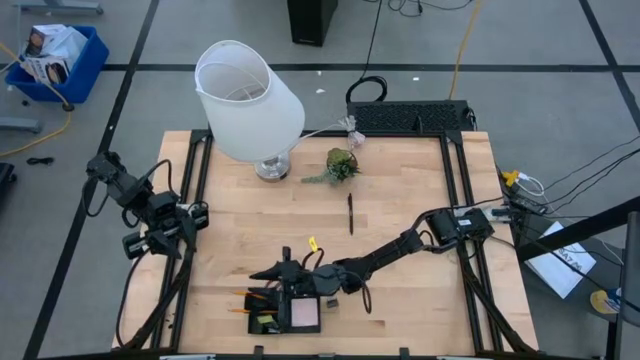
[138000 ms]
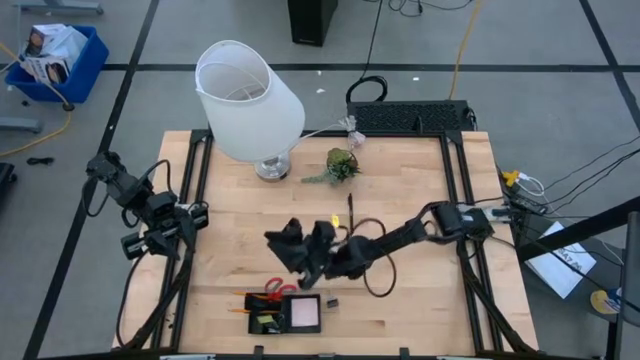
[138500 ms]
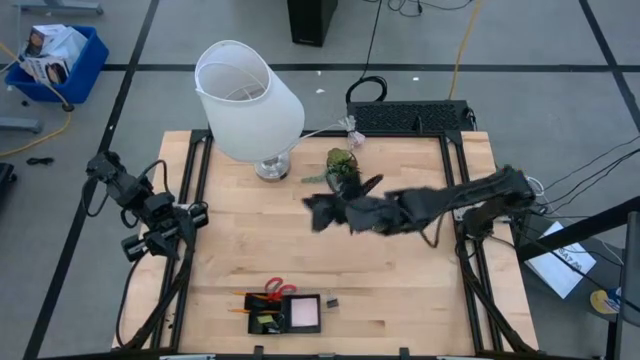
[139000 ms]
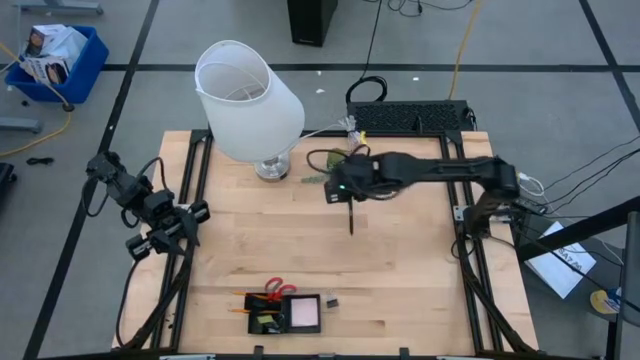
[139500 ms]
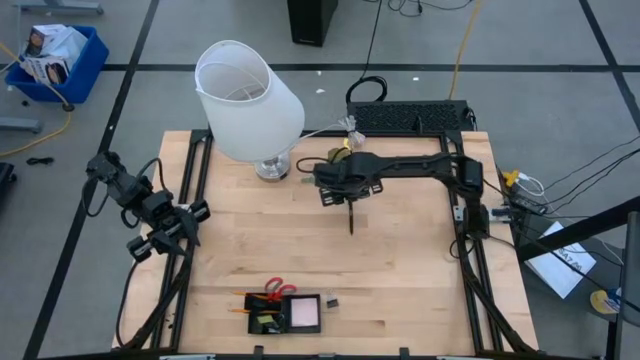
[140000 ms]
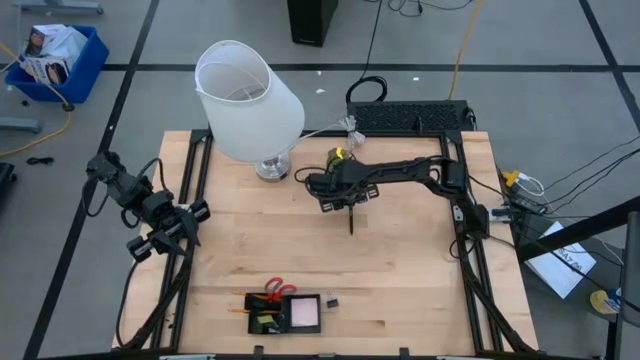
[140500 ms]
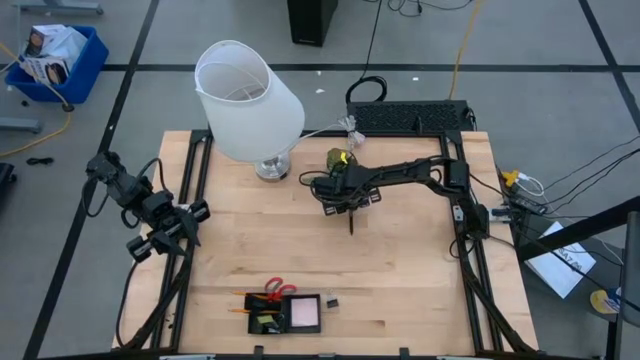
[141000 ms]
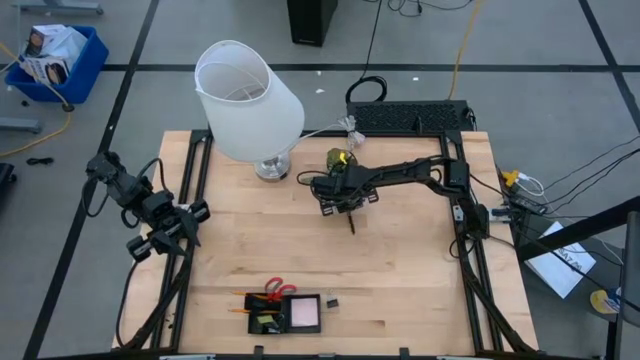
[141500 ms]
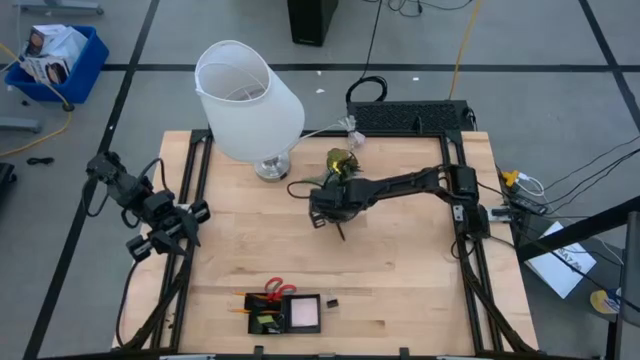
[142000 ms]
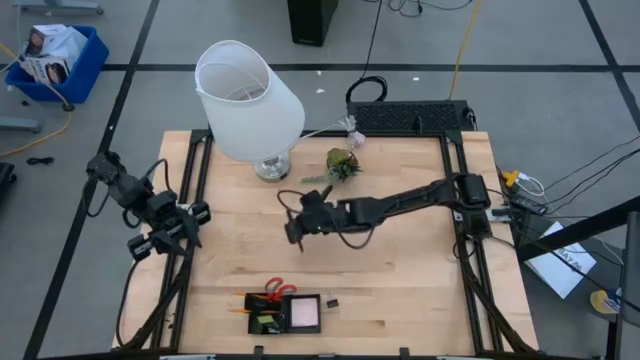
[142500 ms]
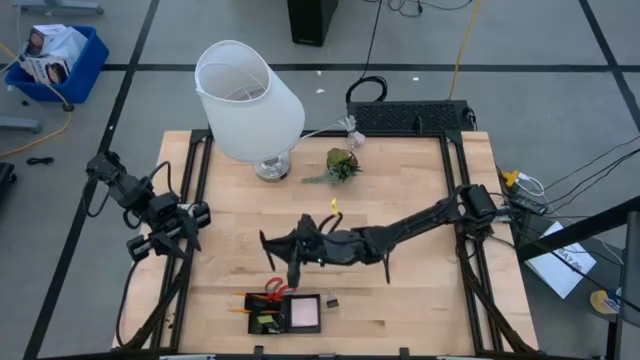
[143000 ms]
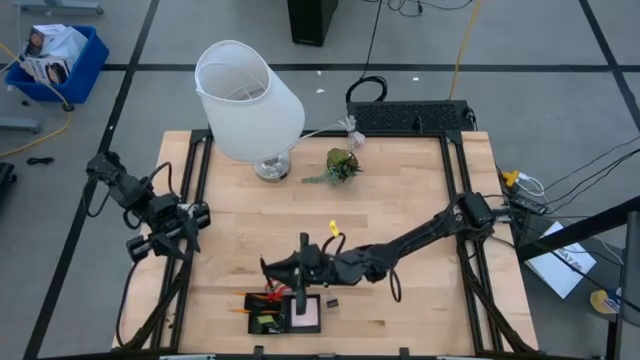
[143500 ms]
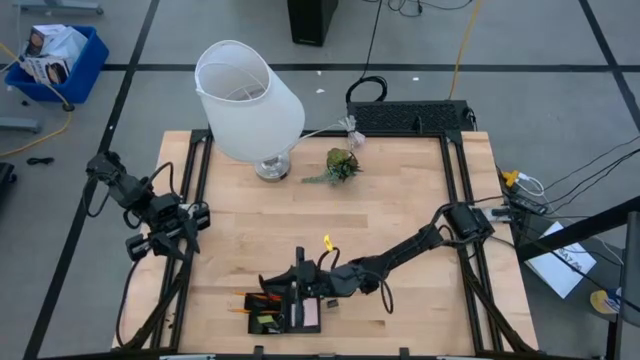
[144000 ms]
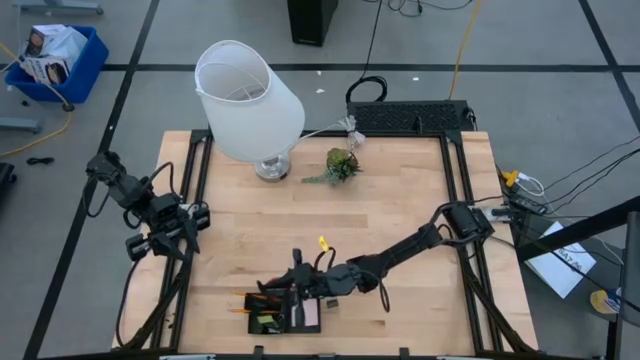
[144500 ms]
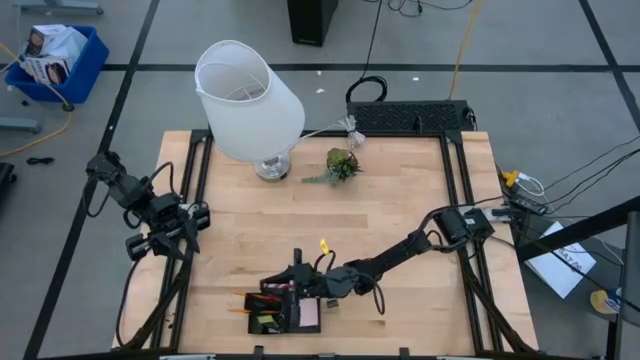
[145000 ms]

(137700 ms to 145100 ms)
Task: Pick and place office supplies into organizer
Put the black pen into the mesh desk organizer

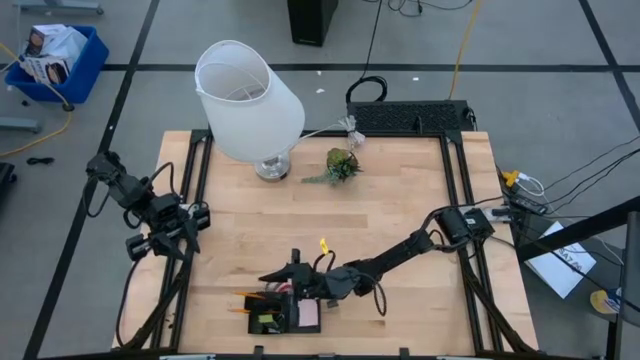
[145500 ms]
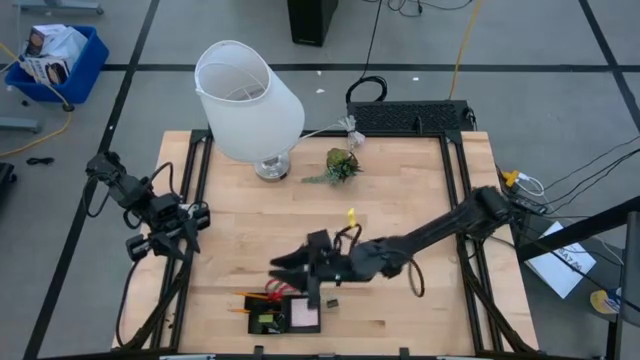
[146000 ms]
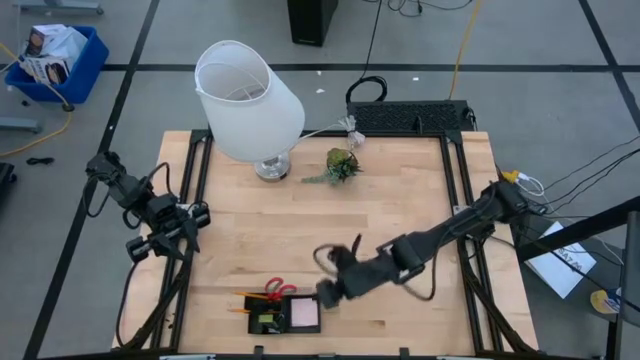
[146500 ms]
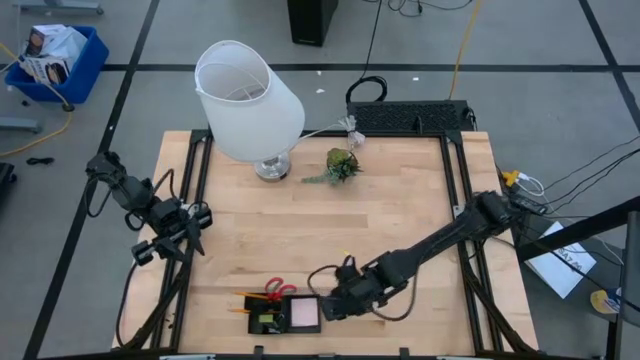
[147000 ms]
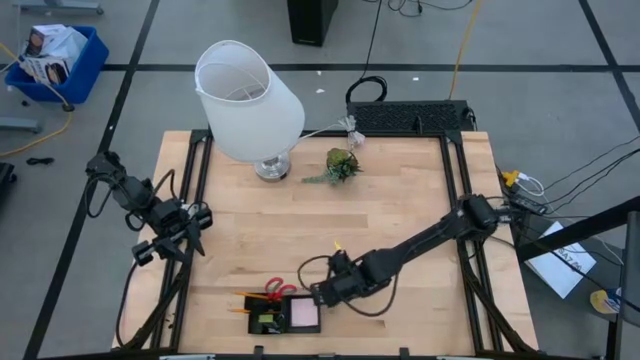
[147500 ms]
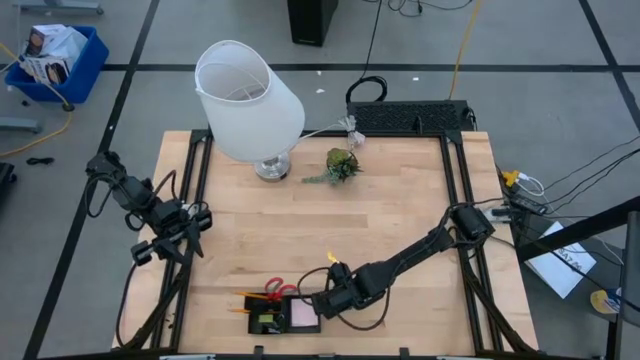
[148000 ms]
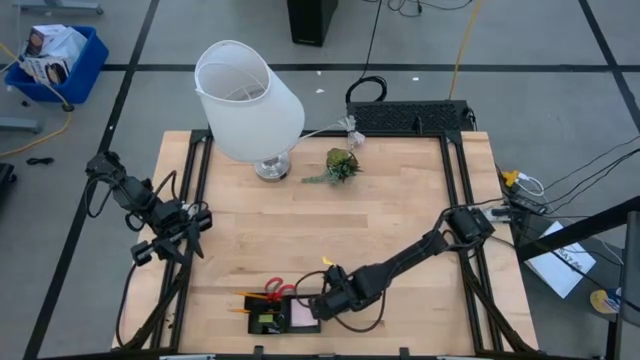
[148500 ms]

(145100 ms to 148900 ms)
Put the black binder clip into the mesh desk organizer

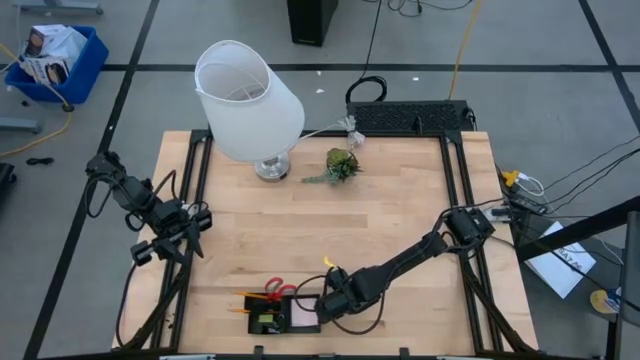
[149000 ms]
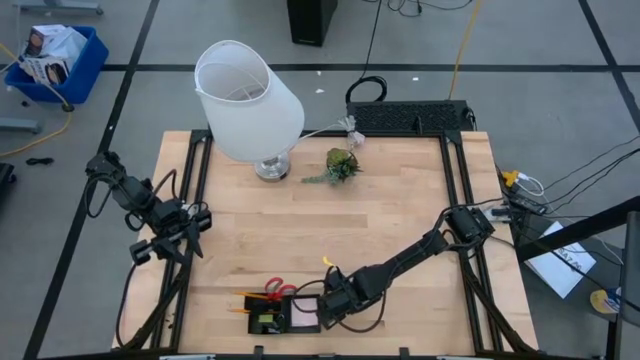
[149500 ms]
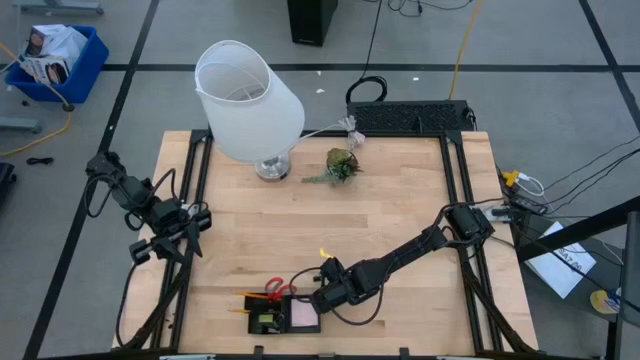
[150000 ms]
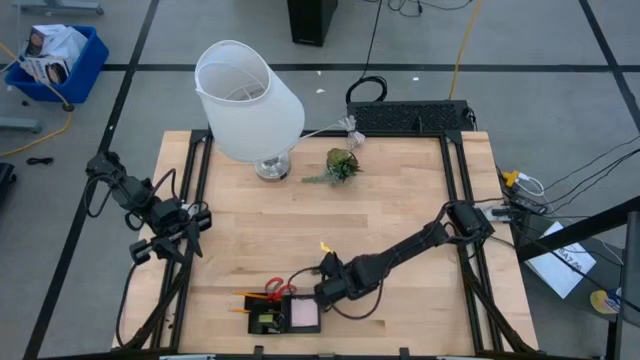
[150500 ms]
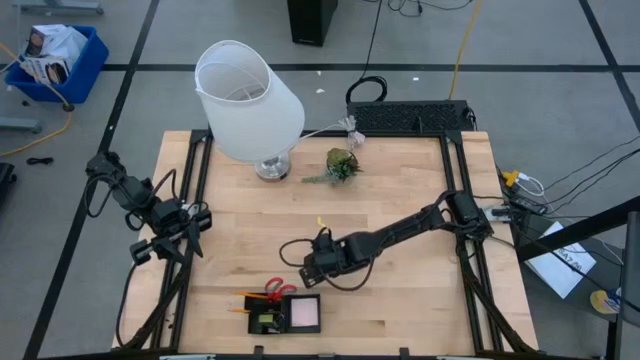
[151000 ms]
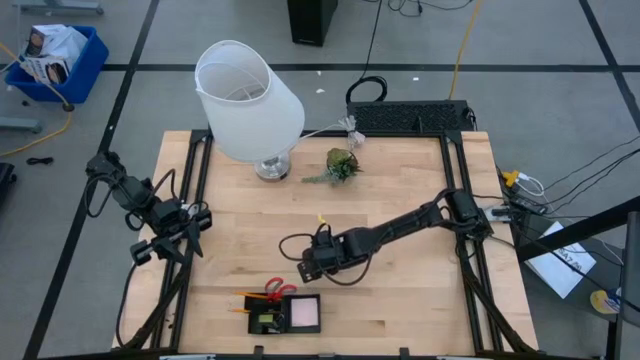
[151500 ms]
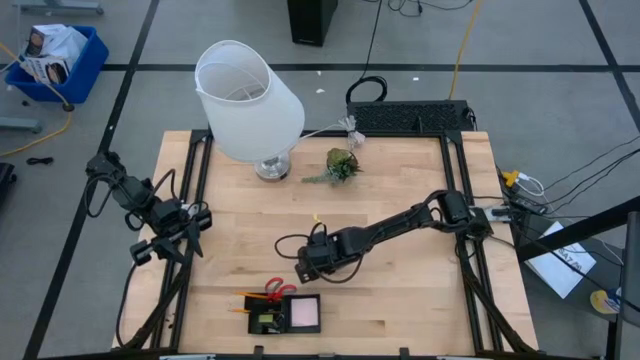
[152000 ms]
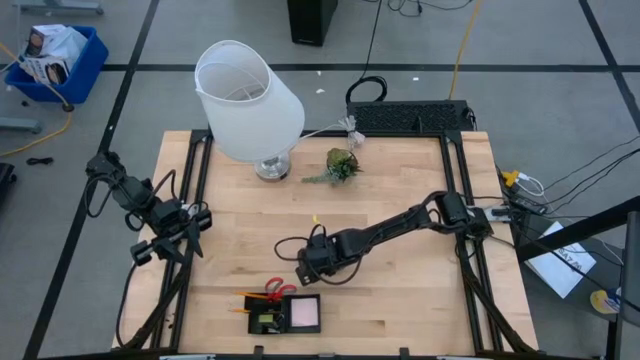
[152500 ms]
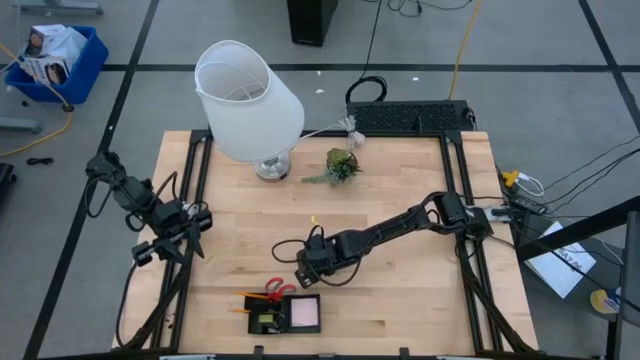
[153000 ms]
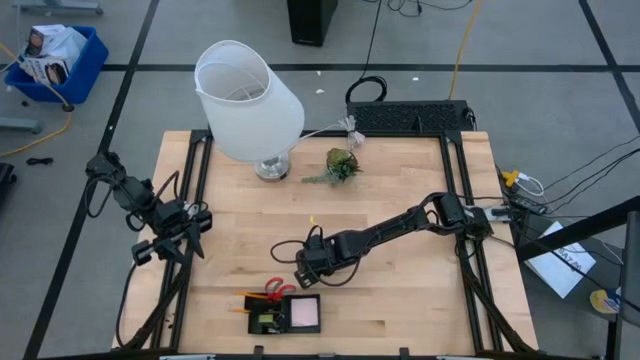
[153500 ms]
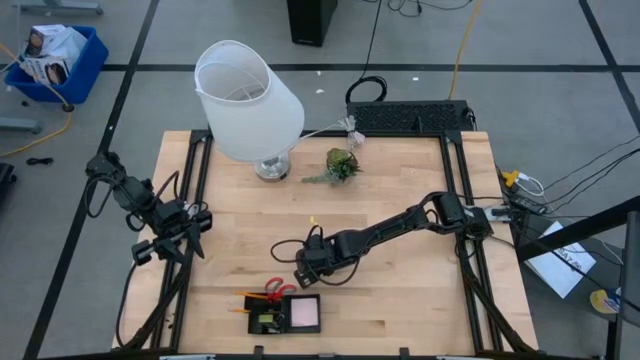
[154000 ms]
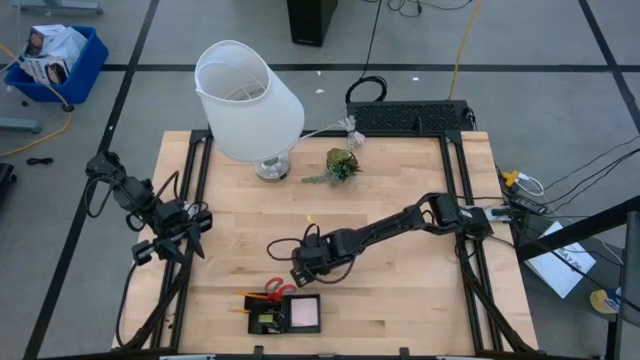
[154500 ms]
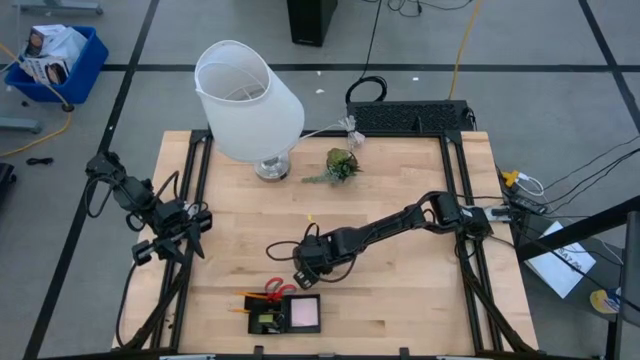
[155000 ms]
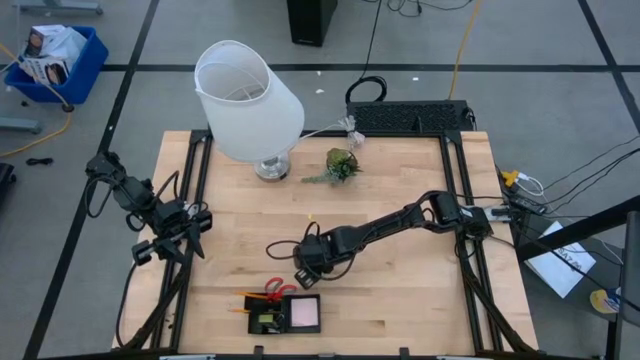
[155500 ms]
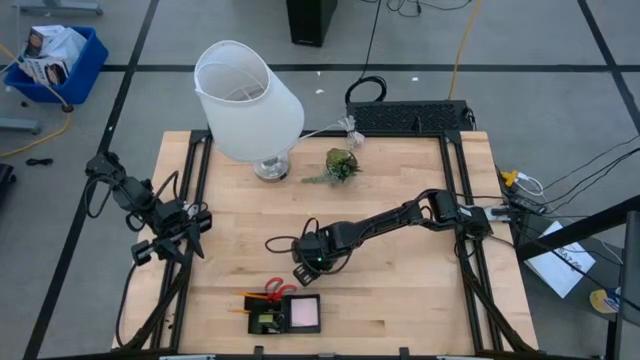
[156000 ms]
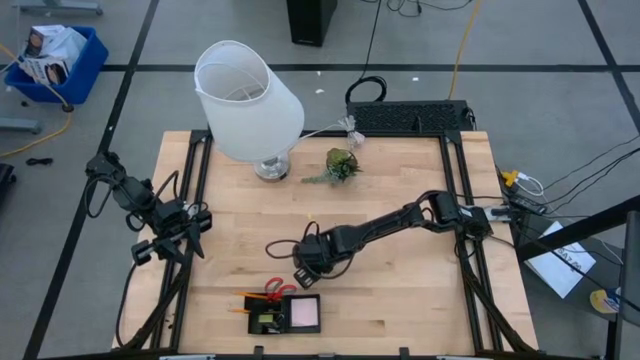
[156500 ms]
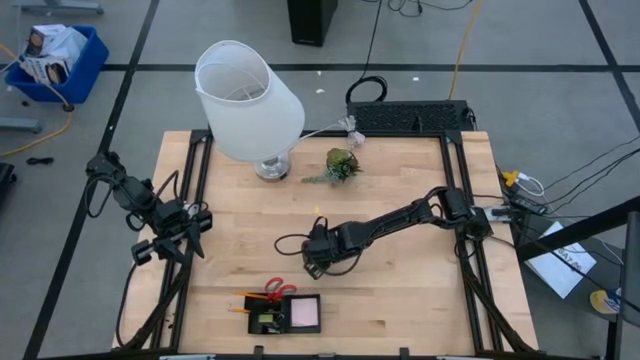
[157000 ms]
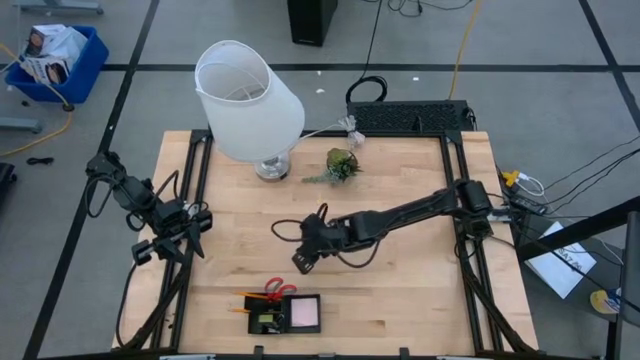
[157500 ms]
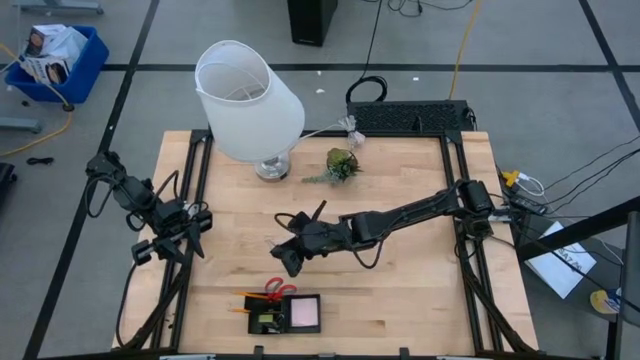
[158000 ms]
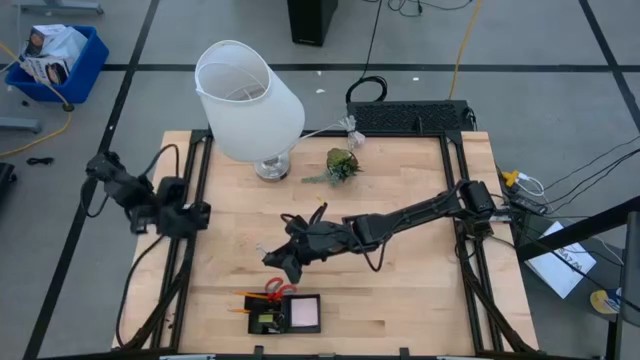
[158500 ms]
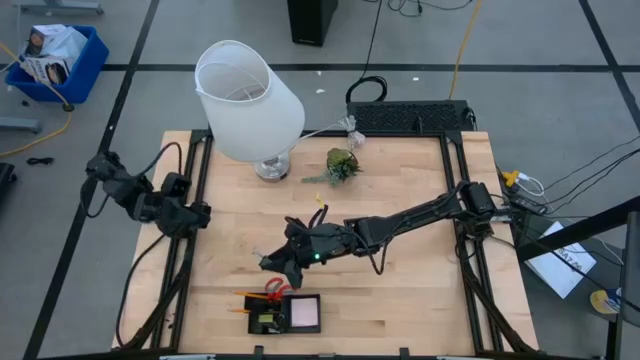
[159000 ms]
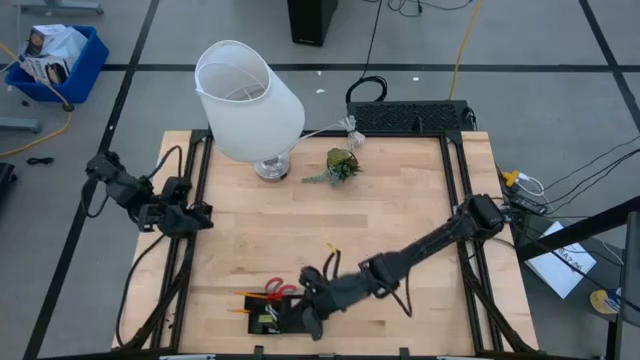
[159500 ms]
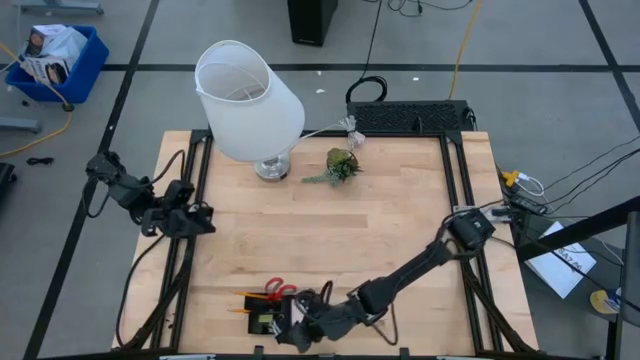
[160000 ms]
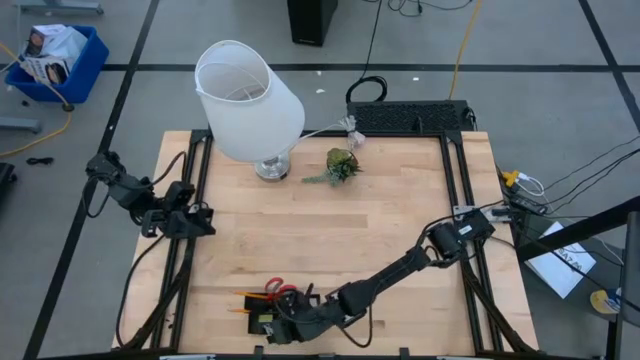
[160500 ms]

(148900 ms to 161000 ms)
Put the black clip into the mesh desk organizer
